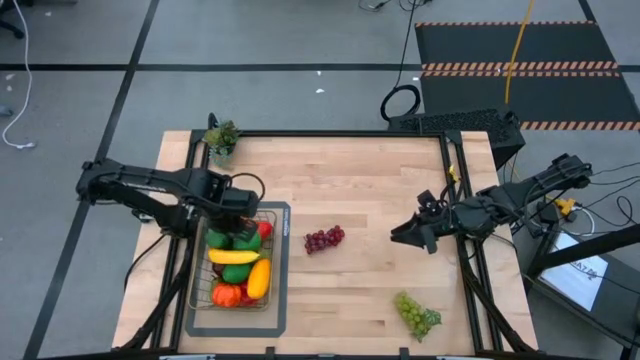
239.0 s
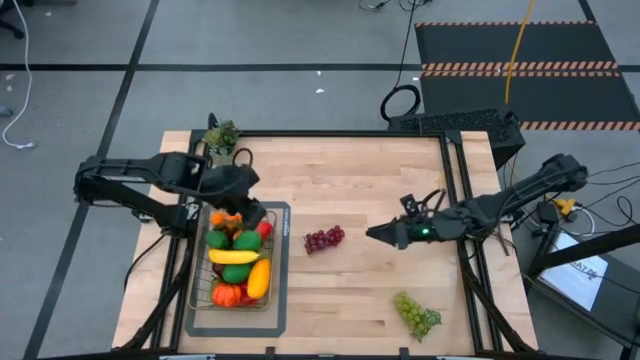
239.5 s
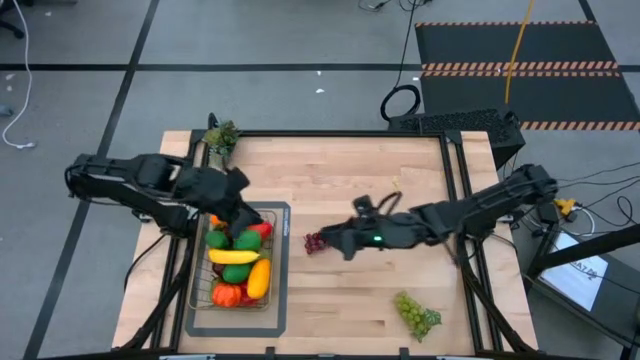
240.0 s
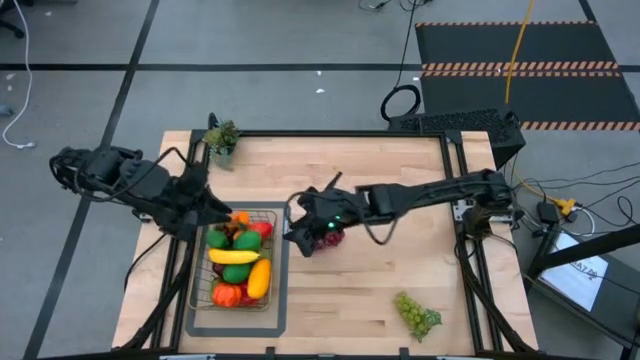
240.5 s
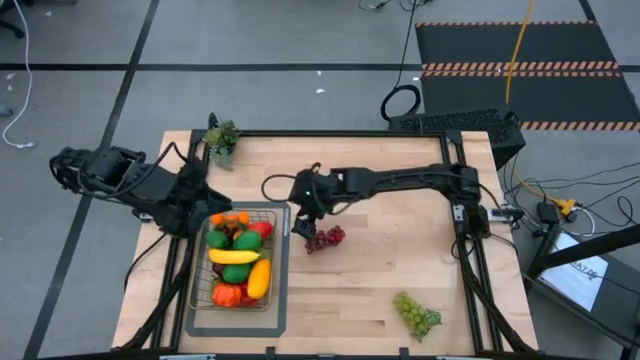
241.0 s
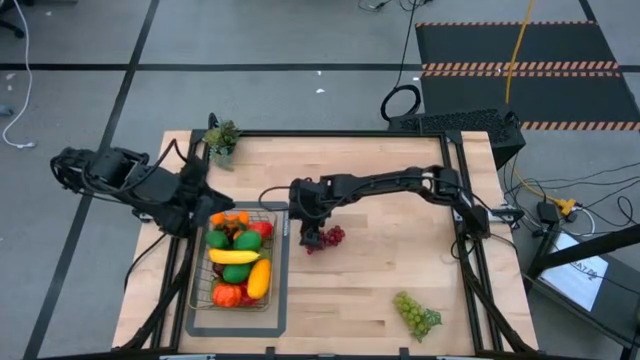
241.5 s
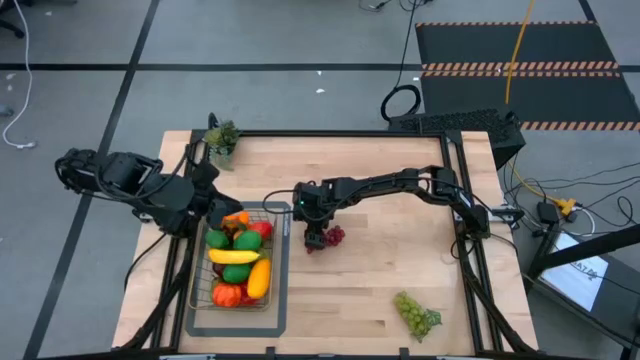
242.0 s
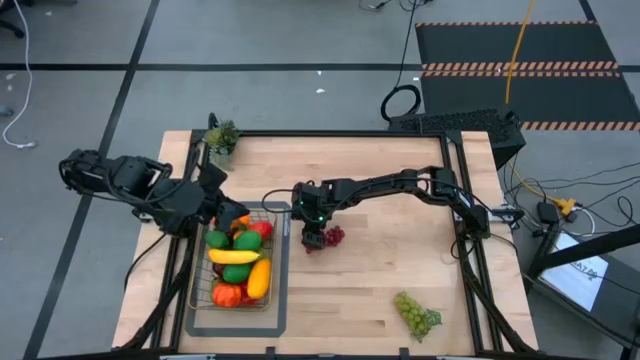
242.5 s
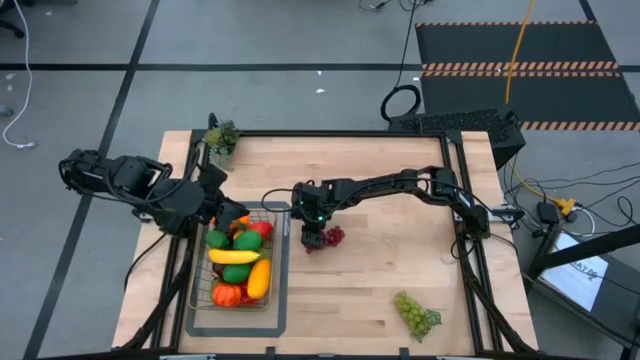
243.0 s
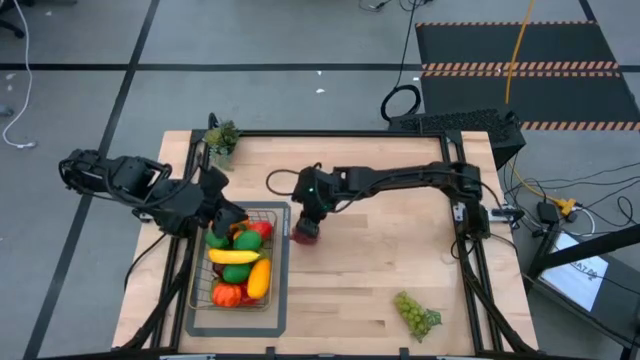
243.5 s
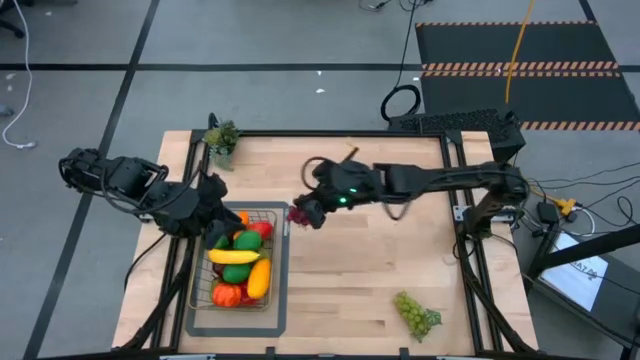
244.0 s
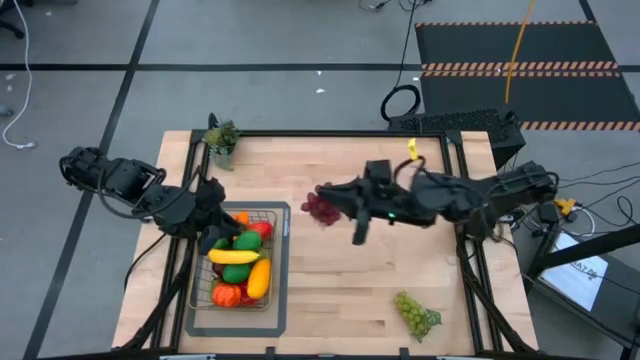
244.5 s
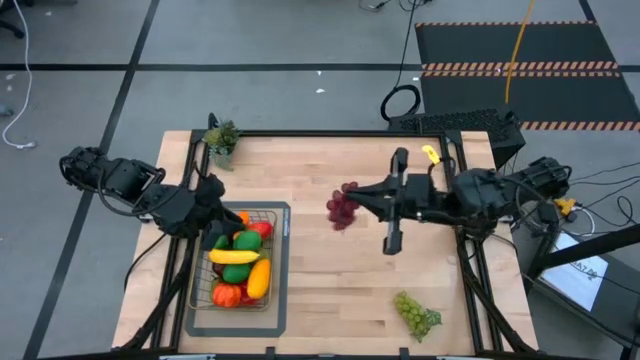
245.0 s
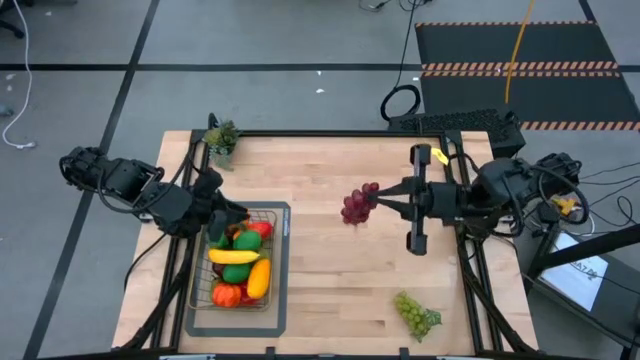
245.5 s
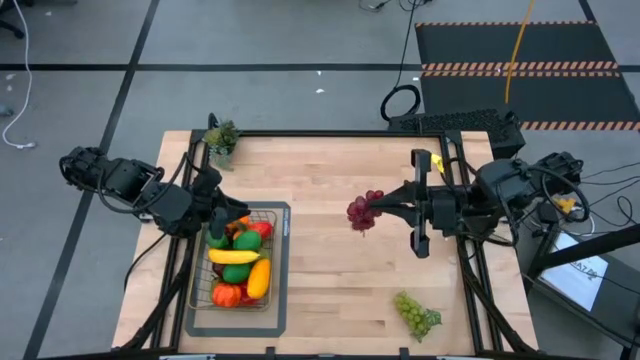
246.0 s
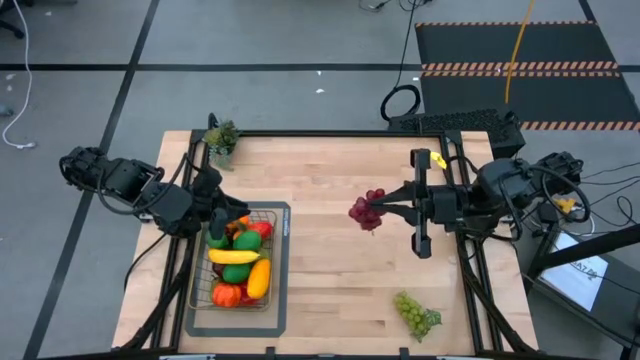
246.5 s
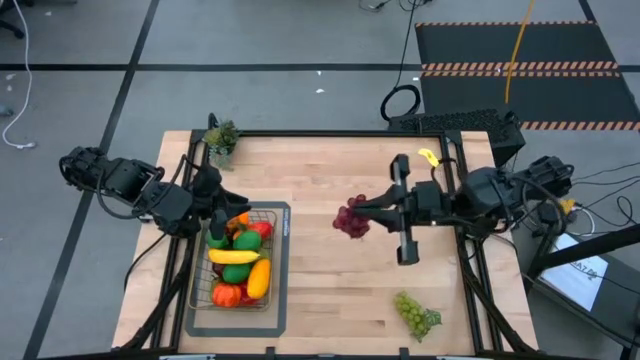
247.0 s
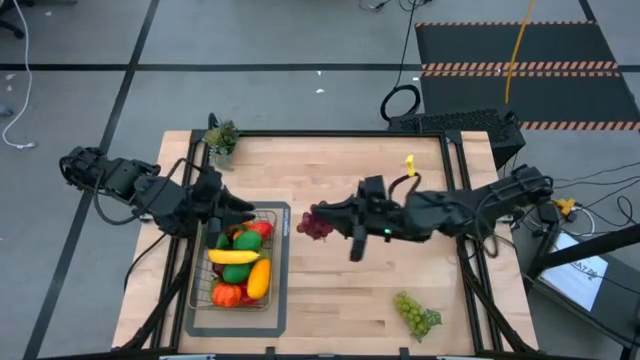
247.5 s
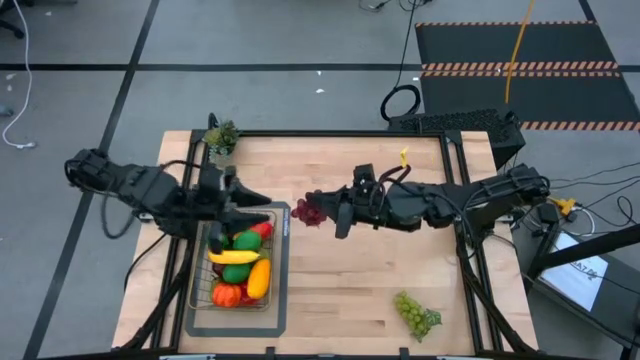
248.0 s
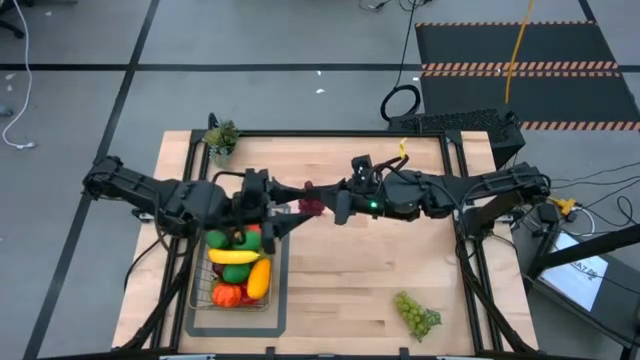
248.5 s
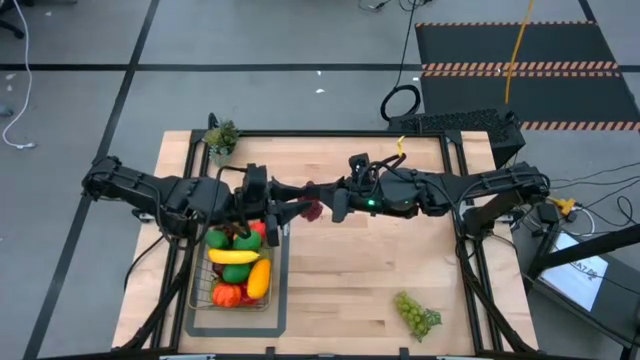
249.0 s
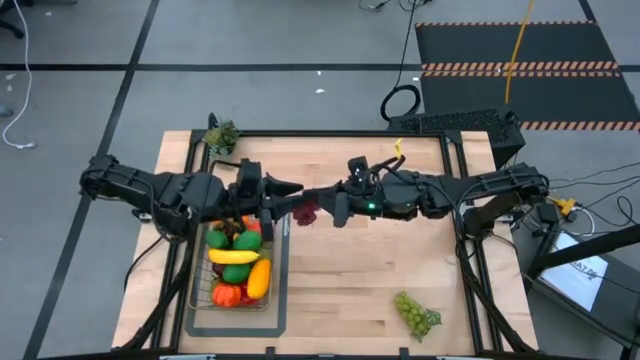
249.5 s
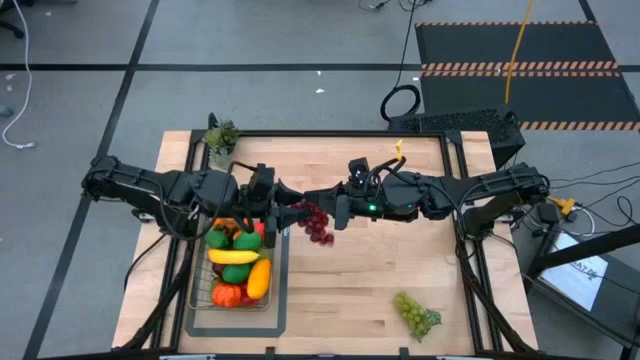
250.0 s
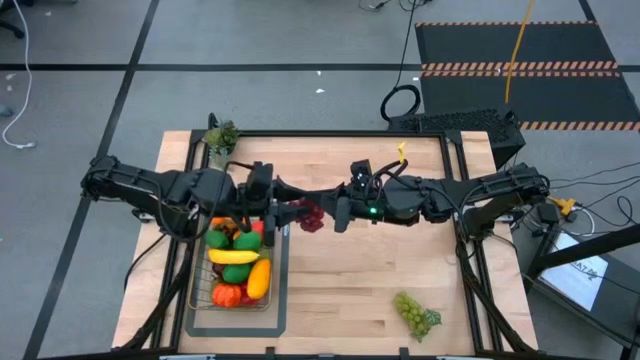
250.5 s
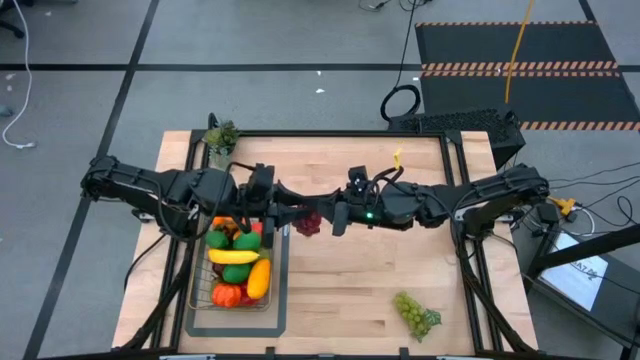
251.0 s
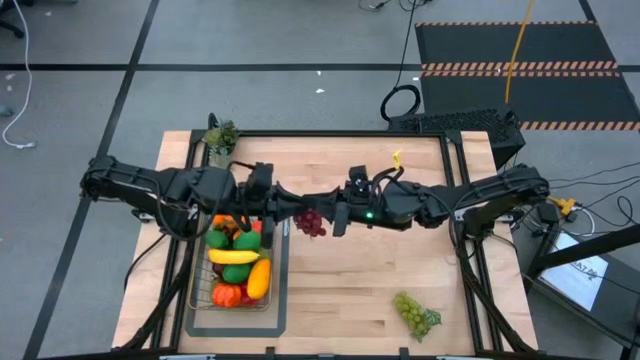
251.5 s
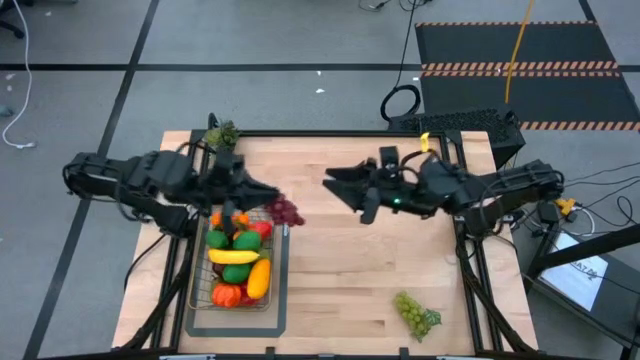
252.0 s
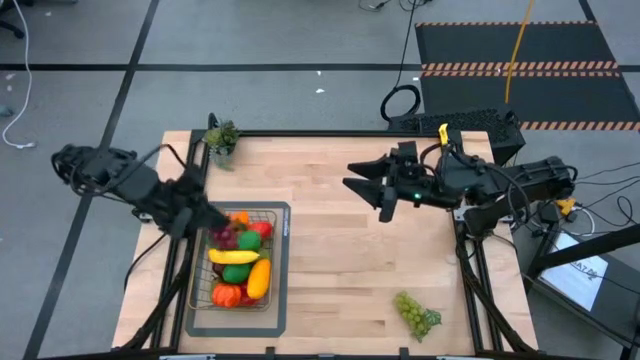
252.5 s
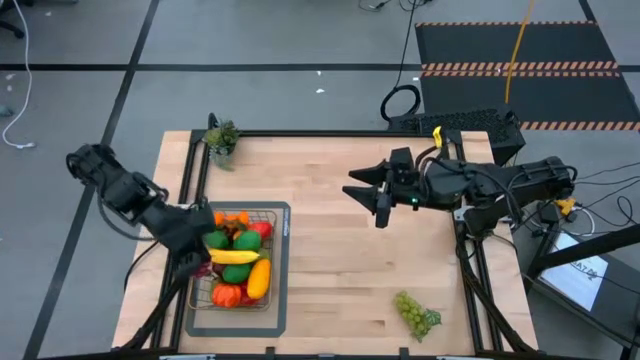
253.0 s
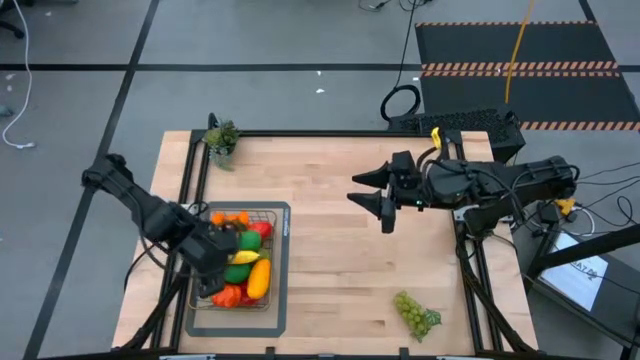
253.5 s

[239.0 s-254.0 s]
Task: Build produce basket
Put the red grapes into the wire basket

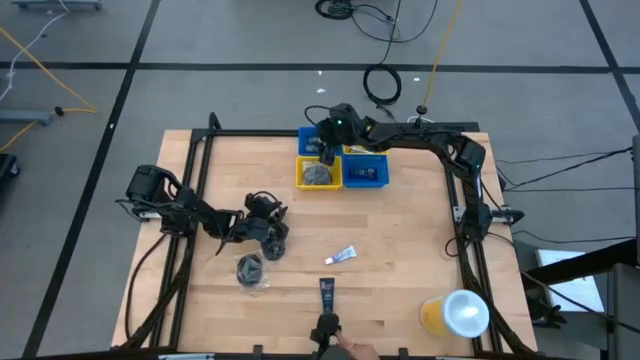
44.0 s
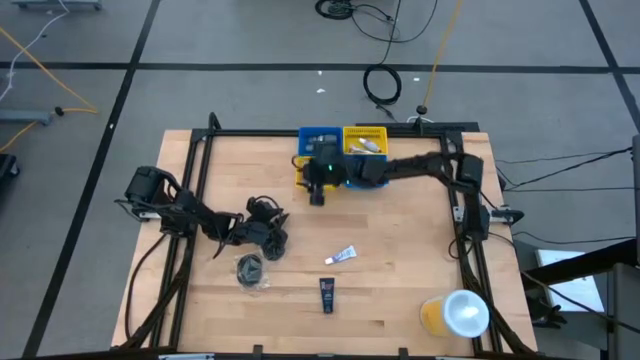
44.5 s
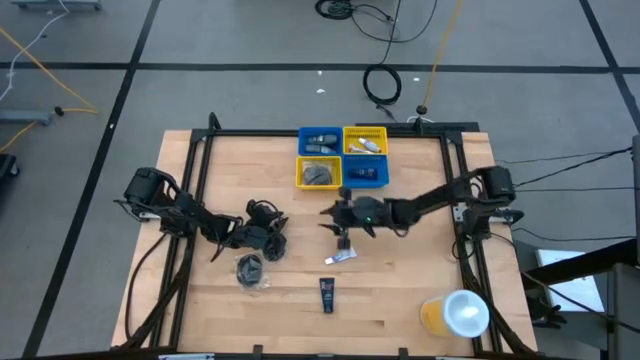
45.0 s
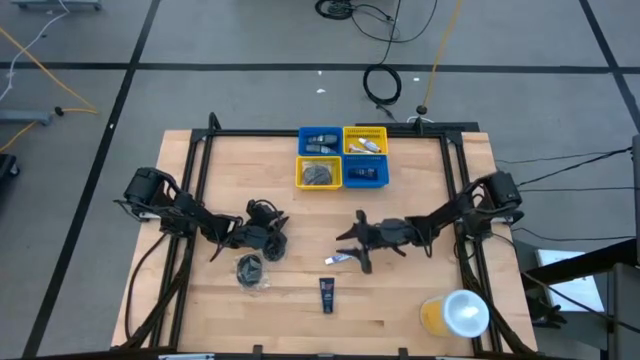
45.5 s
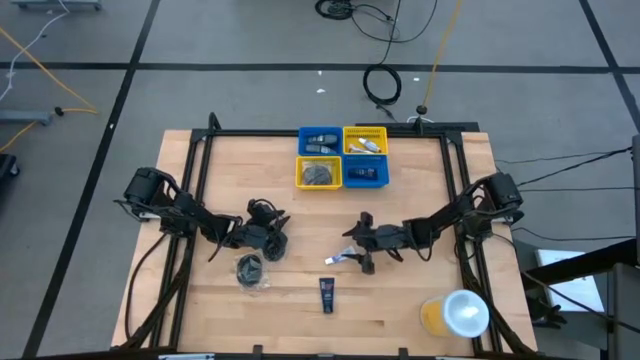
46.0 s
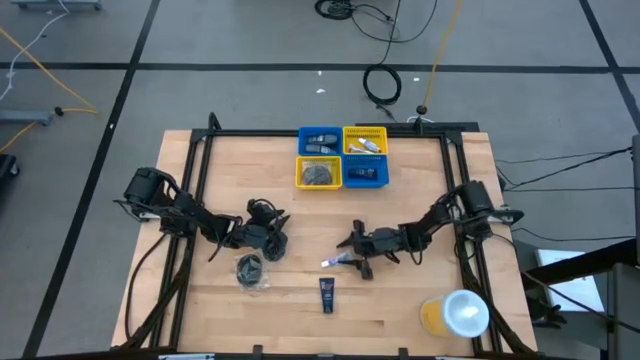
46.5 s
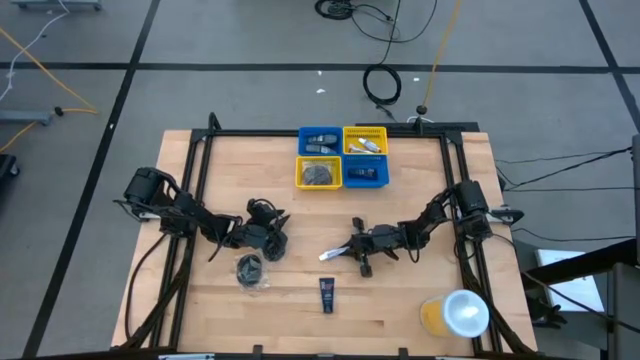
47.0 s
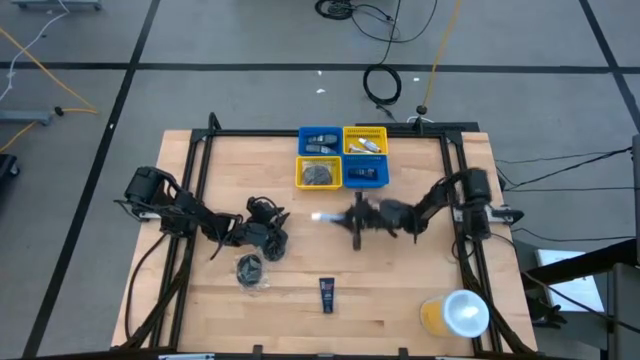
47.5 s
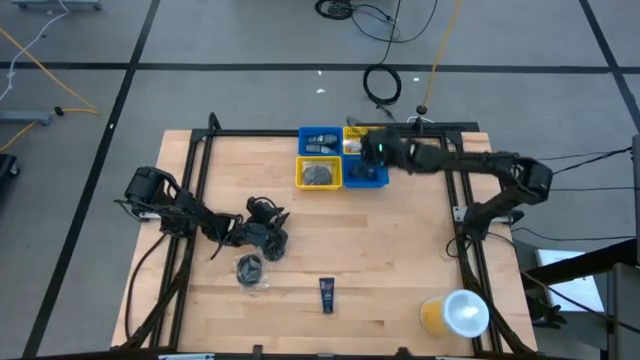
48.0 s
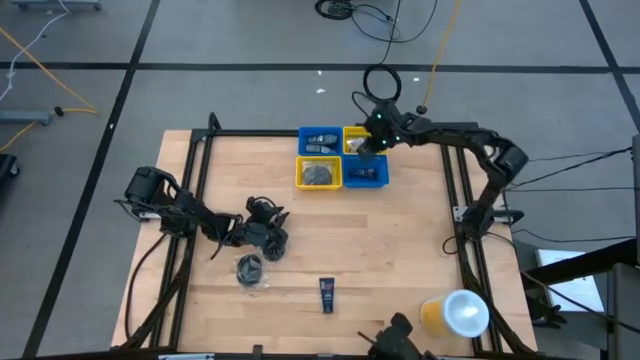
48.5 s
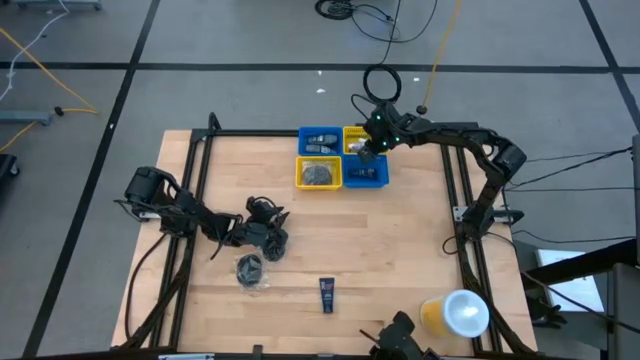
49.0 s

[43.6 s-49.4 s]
Task: Pick & Place Travel size toiletries
Put the white toothpaste into the right yellow bin
